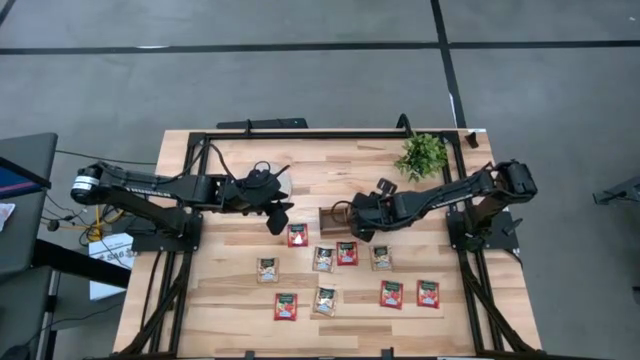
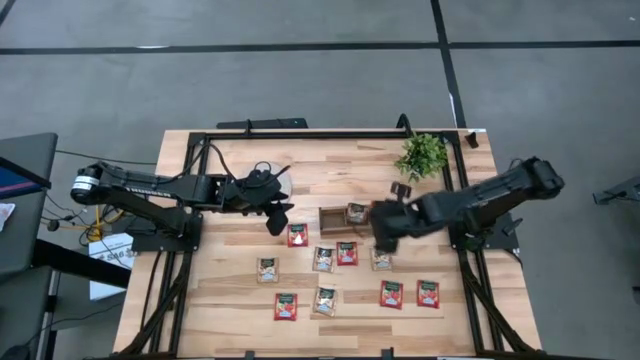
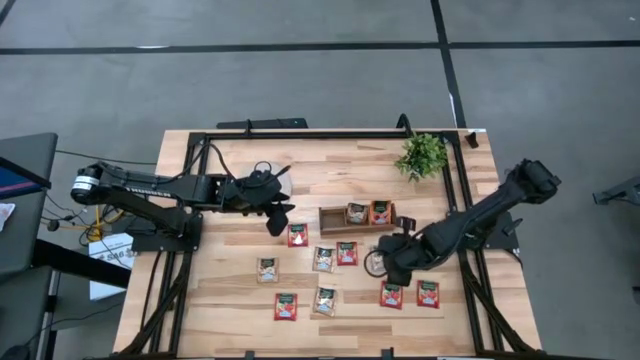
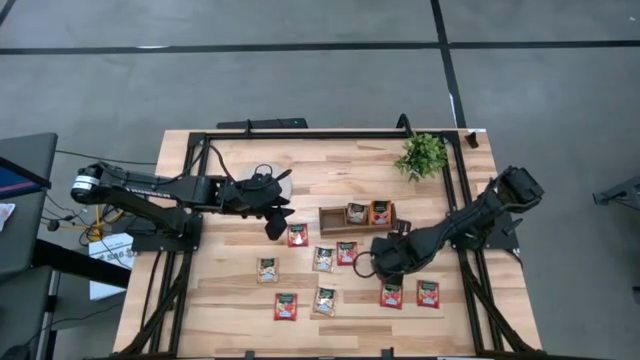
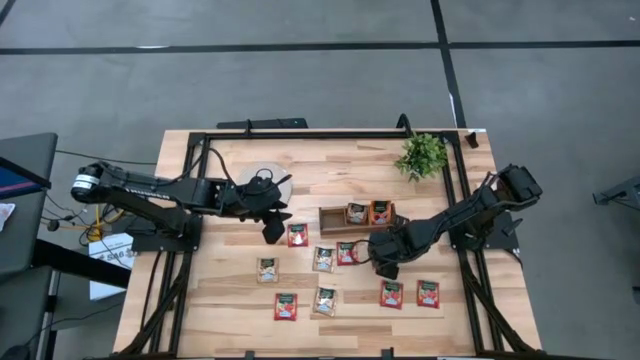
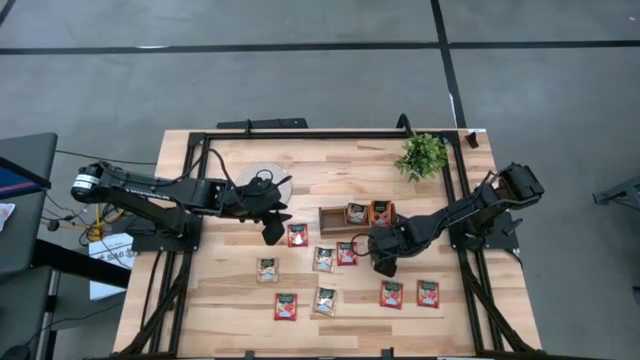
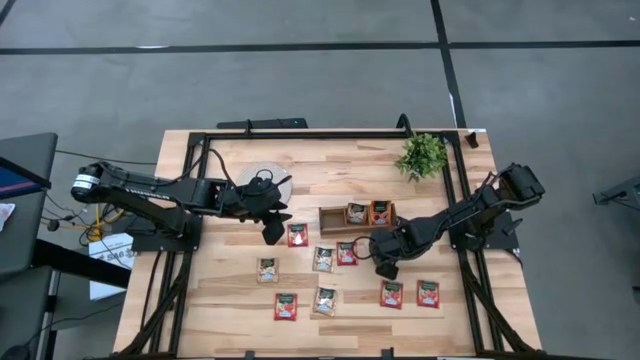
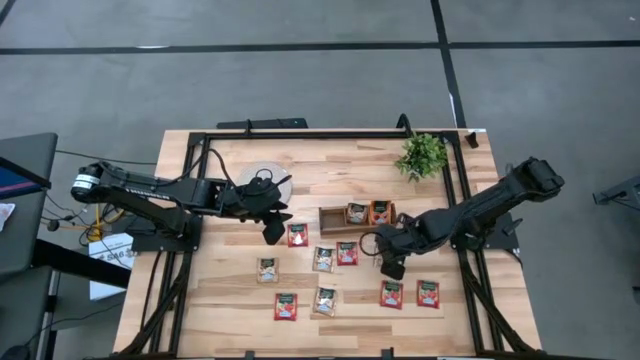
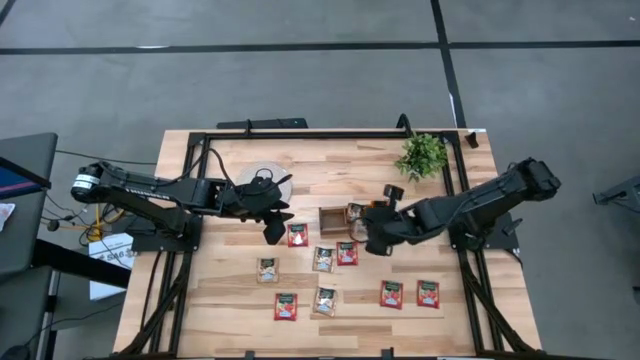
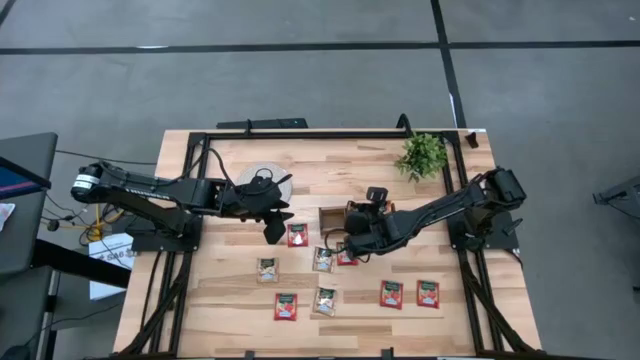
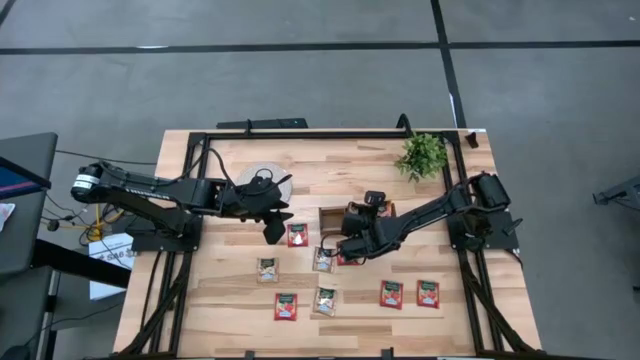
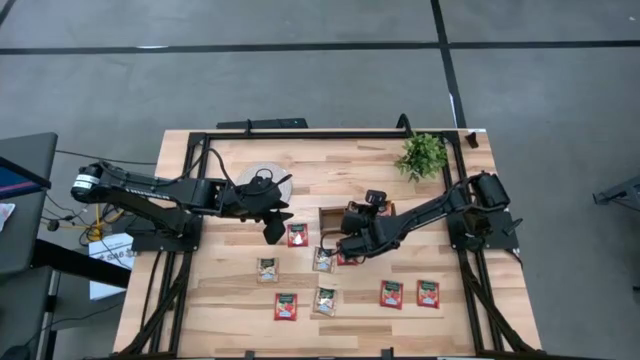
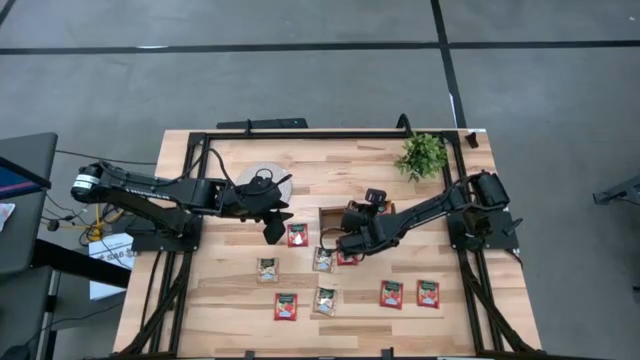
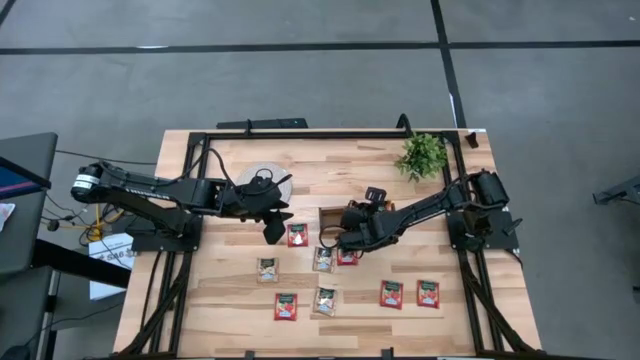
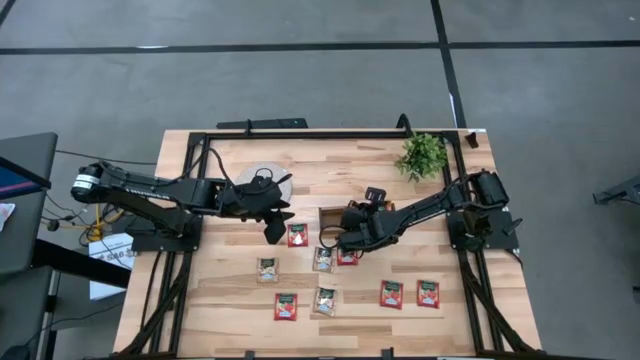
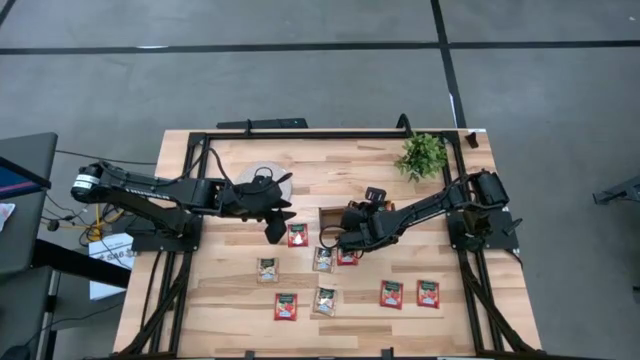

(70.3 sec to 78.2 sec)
Task: Pick & Place Tea
Put the brown tea bag into the middle section of the wooden organizer

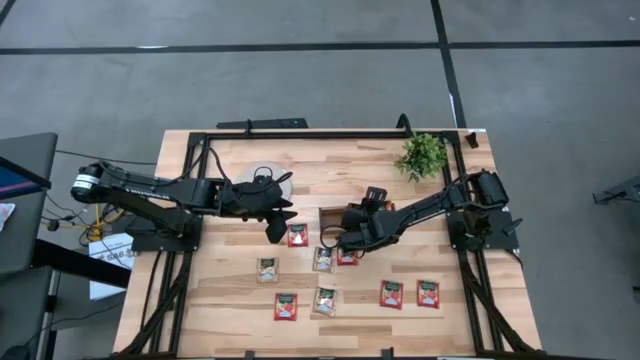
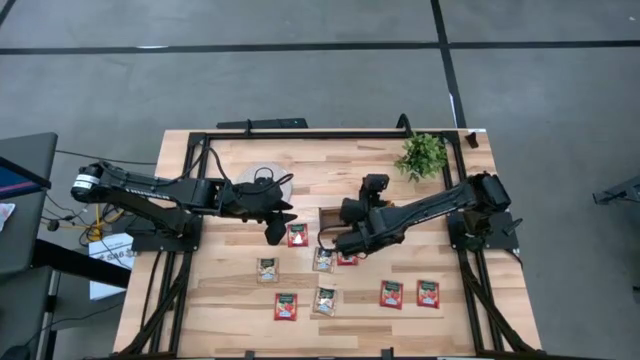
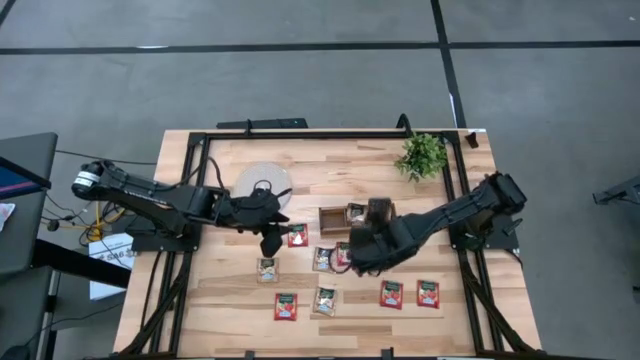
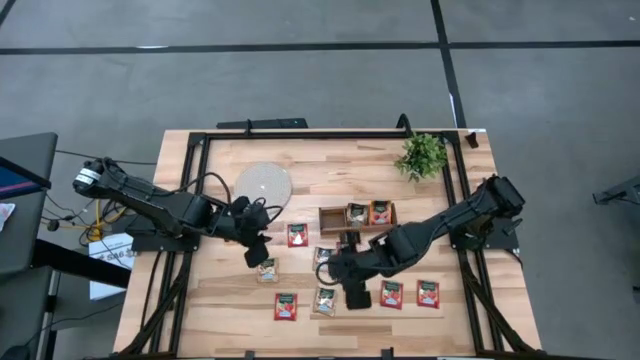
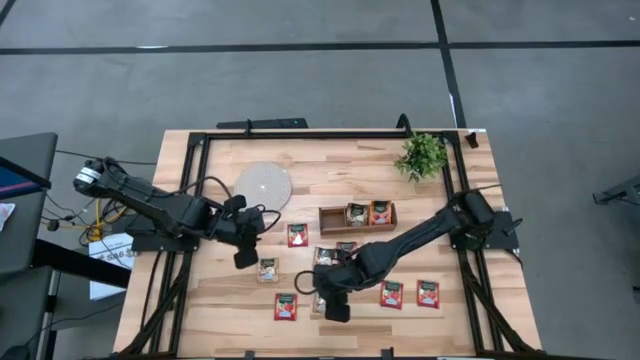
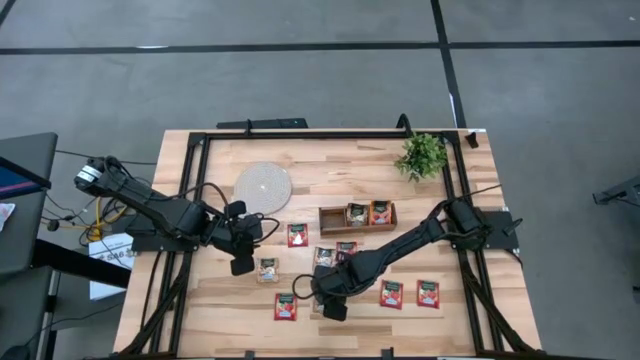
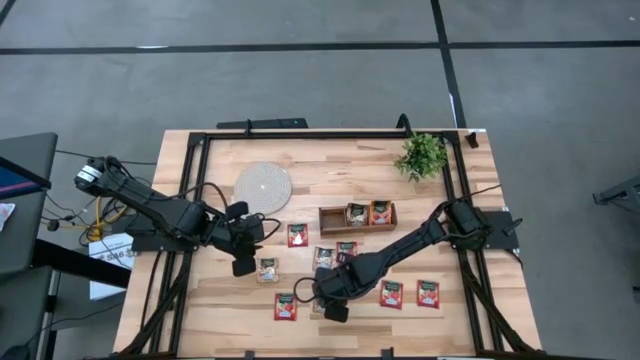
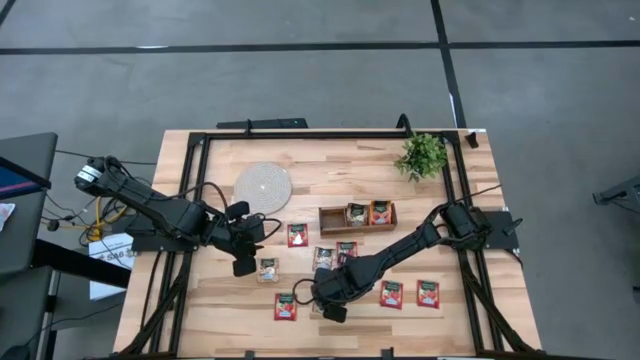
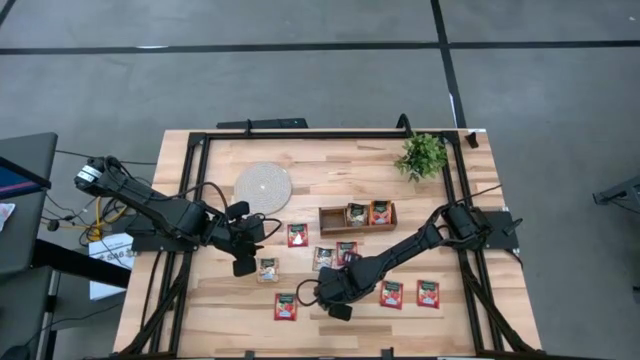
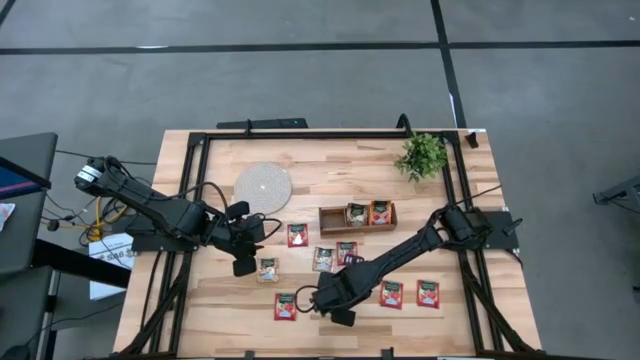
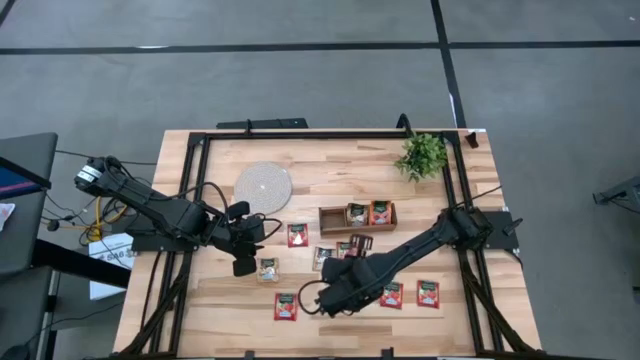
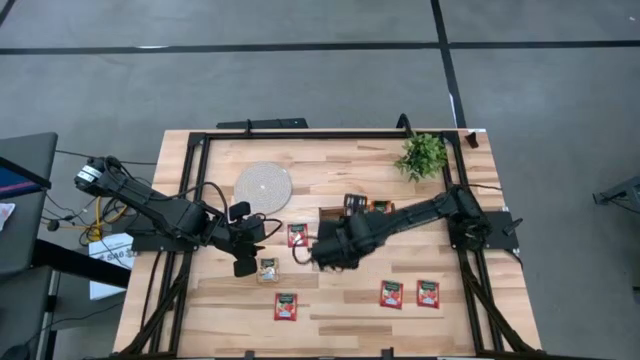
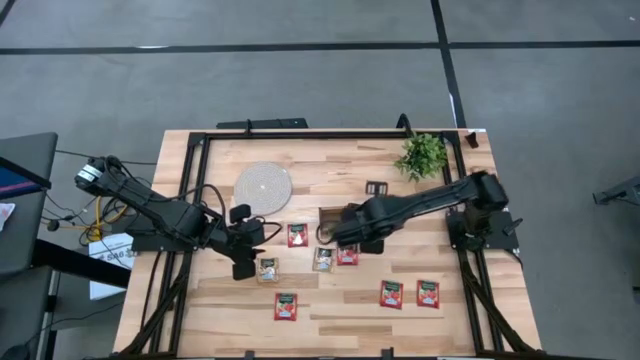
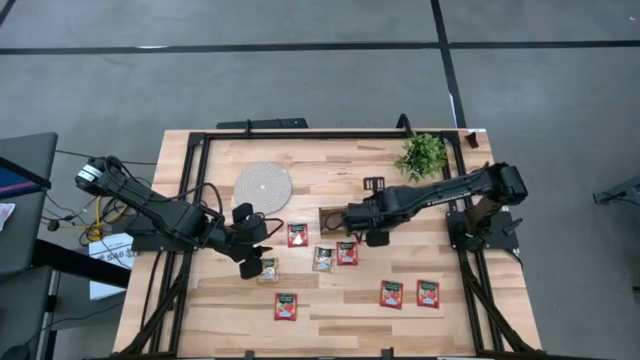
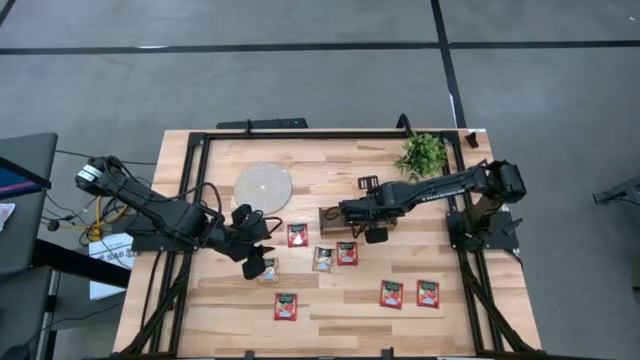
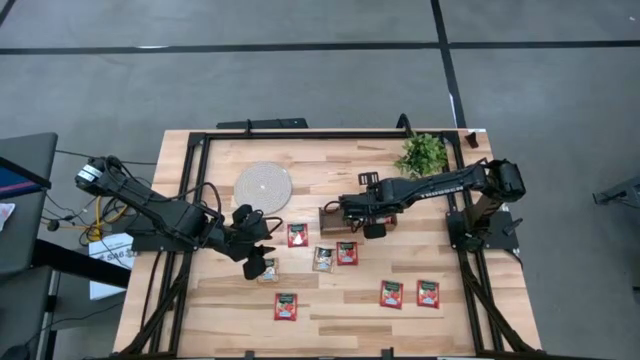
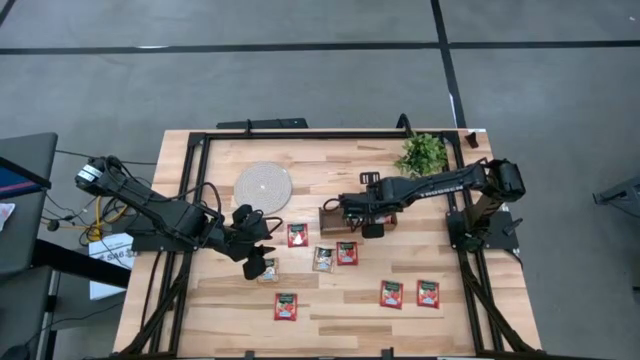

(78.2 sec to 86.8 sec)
Put the brown tea bag into the middle section of the wooden organizer

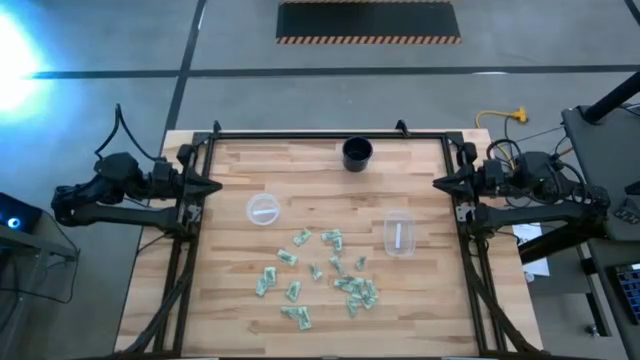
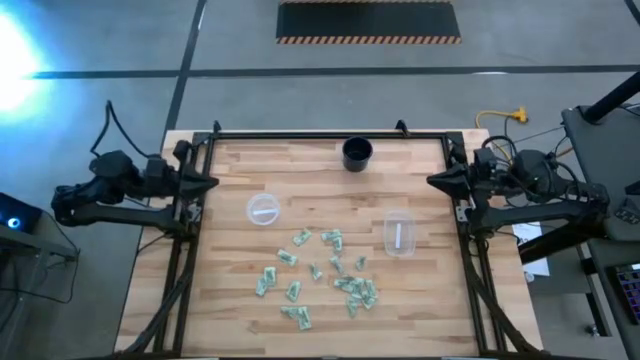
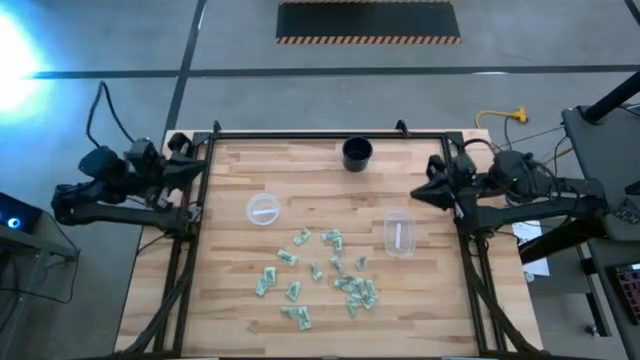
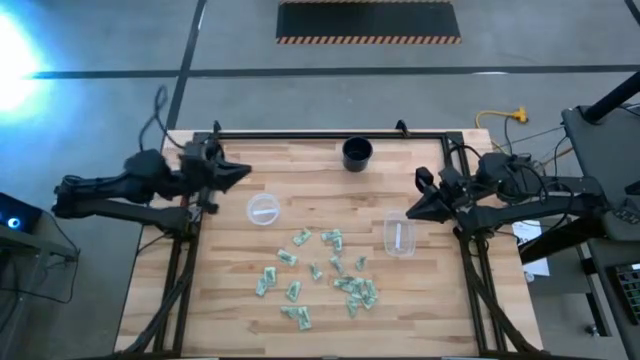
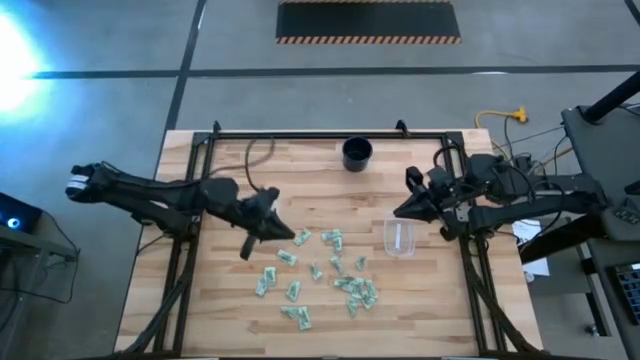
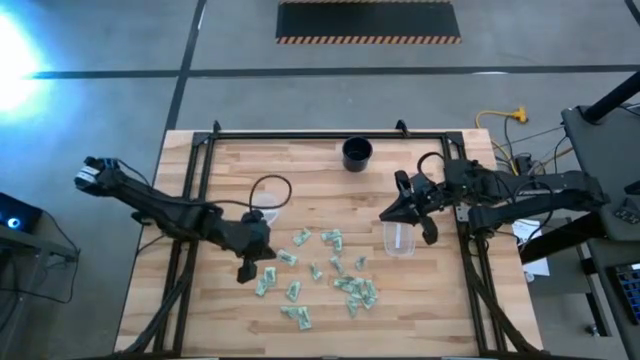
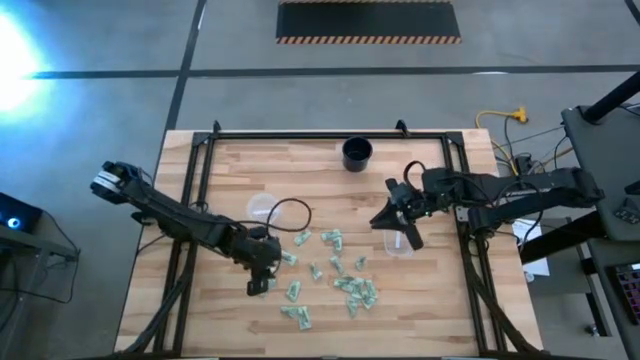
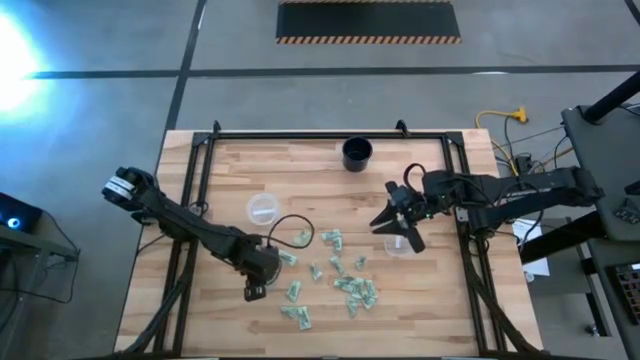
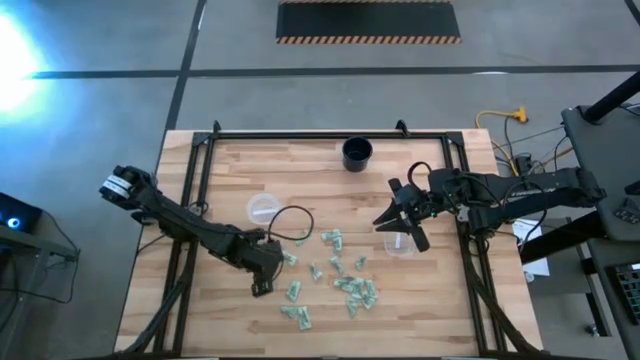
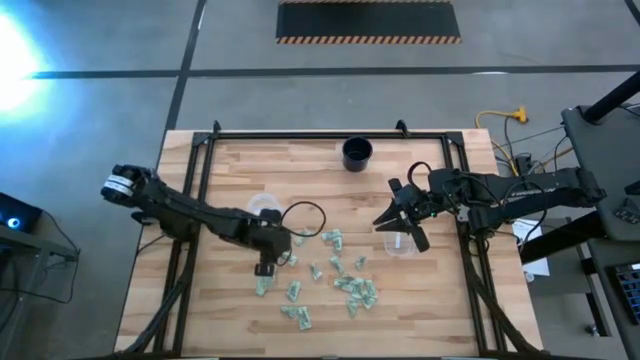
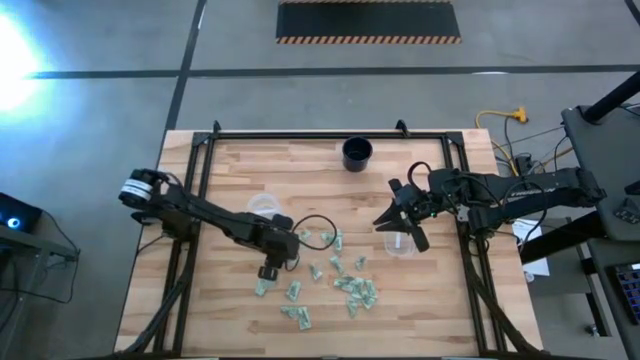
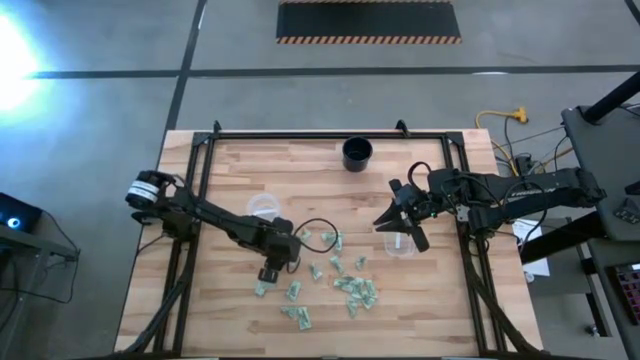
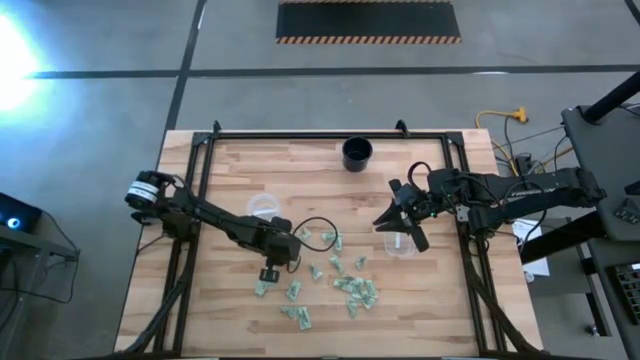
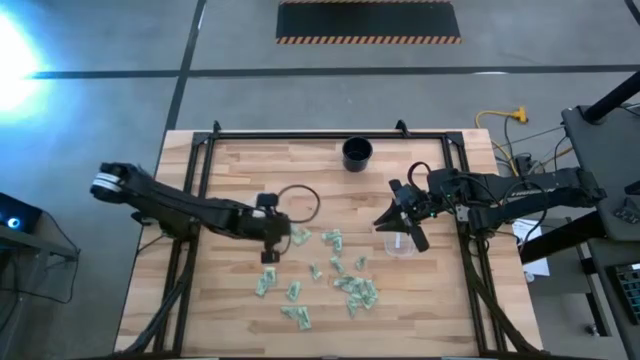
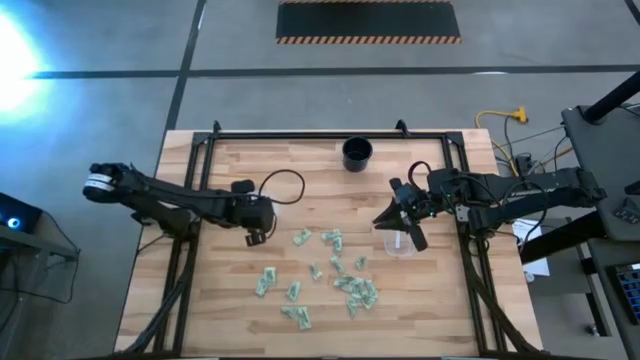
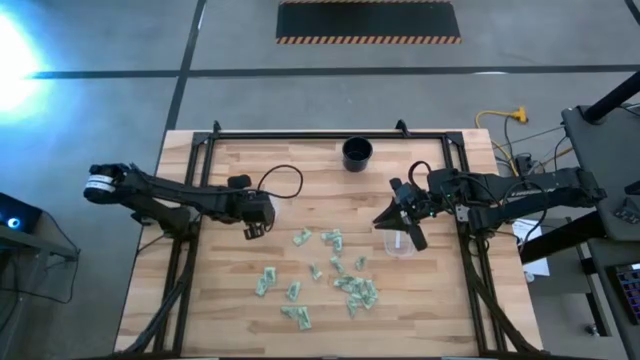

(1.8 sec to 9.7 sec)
Task: Pick and place items into bin
Put the white sweetener packet into the left transparent bin
